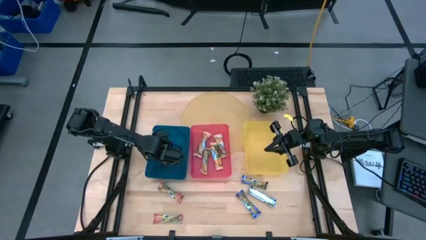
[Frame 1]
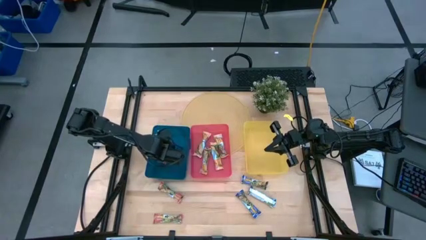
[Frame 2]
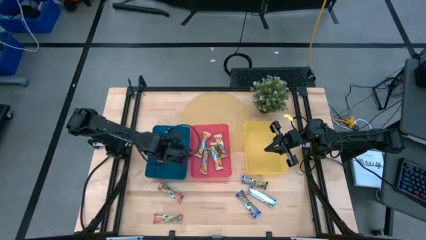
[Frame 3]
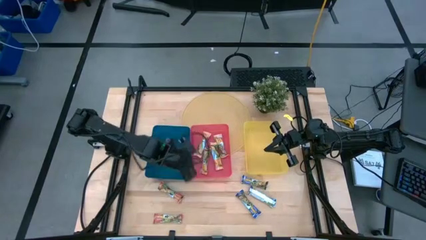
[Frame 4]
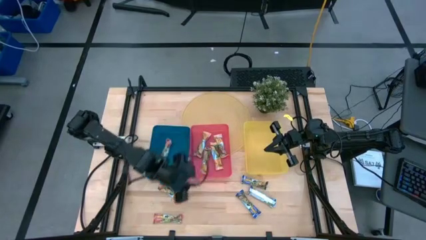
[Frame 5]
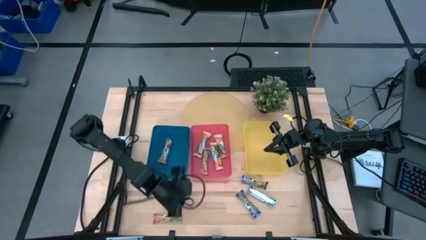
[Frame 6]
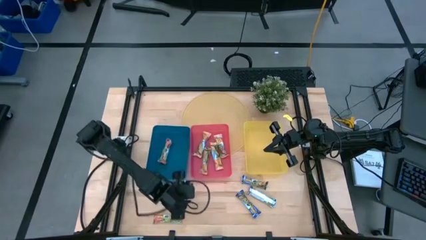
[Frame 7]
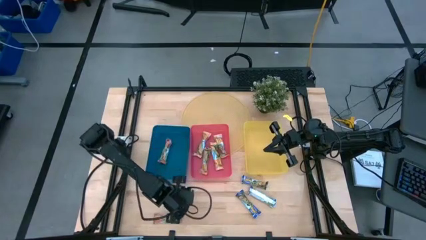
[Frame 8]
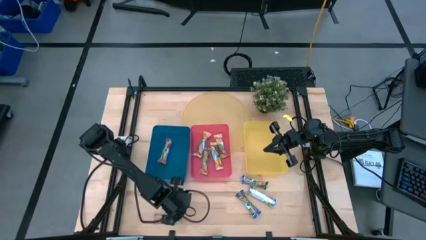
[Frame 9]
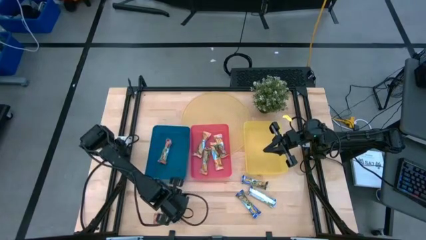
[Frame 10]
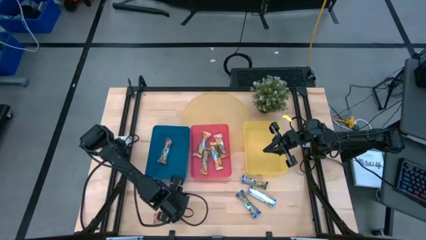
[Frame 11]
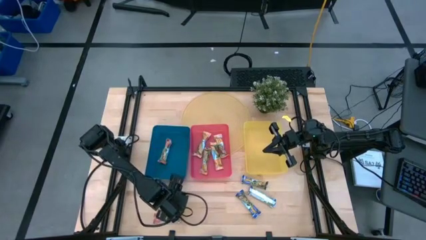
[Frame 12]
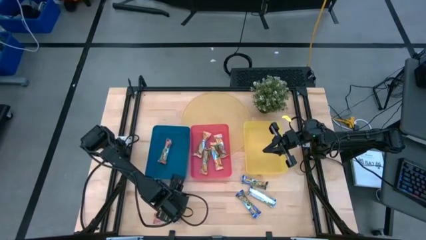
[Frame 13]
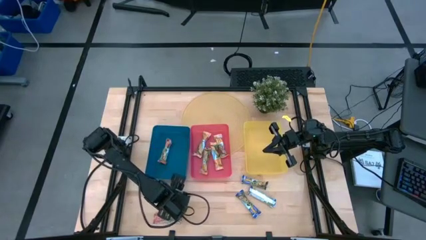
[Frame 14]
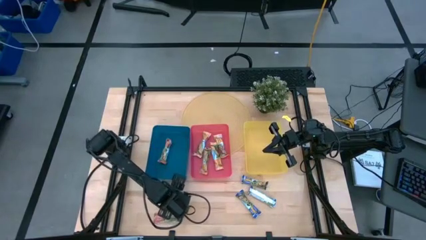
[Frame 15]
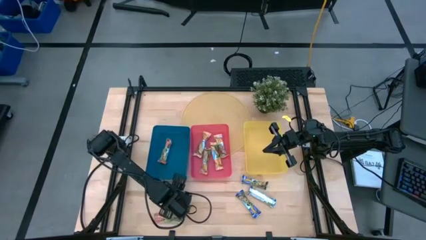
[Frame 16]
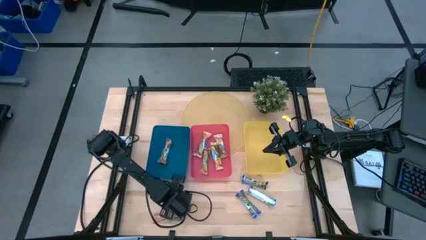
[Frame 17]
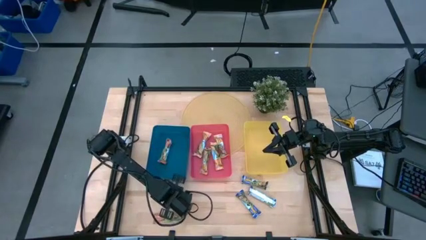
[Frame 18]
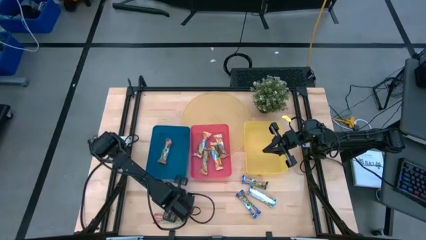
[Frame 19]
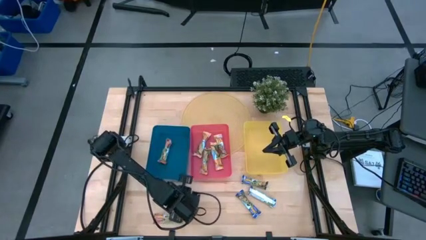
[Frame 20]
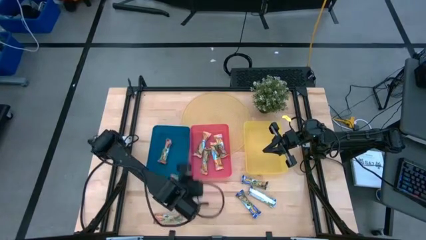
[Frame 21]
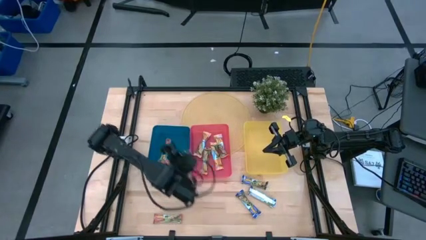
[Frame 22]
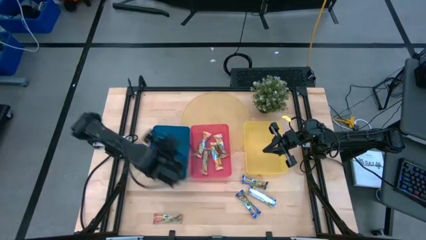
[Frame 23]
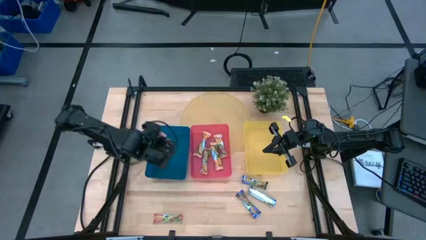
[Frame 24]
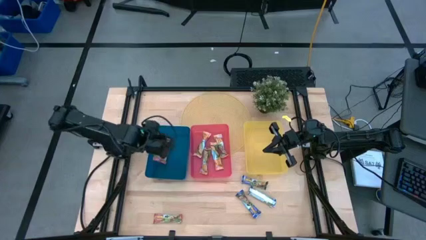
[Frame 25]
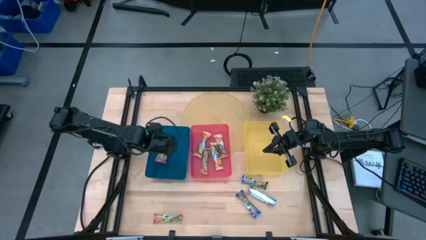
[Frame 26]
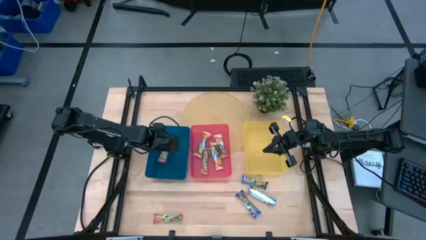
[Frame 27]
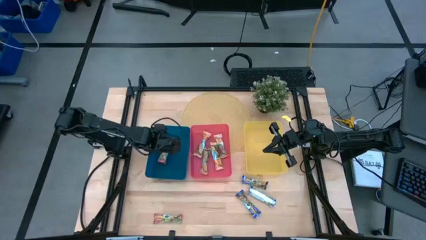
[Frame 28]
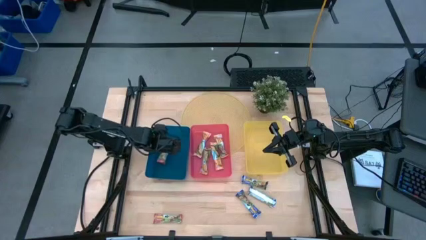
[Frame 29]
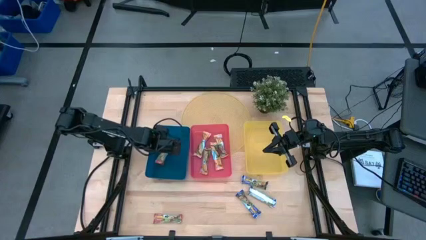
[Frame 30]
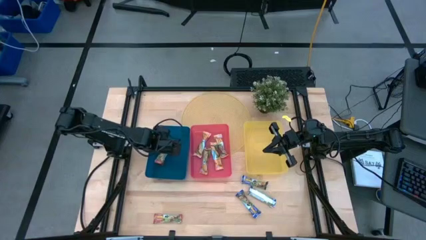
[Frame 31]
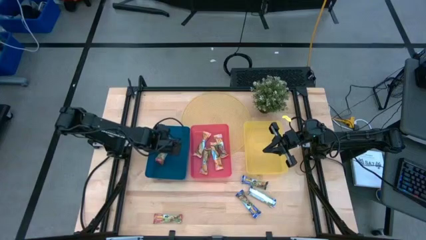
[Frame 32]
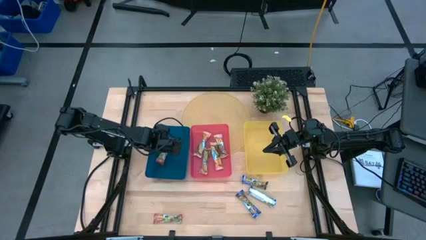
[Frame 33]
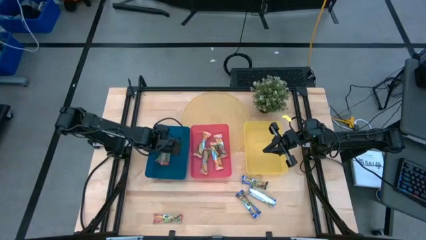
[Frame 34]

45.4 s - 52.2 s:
Task: Pick and place Granola Bars by type
Put the red granola bar into the blue bin

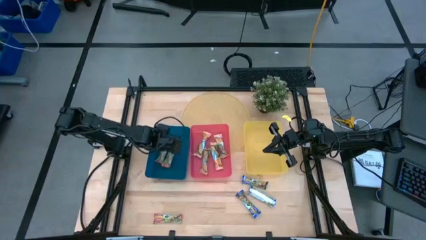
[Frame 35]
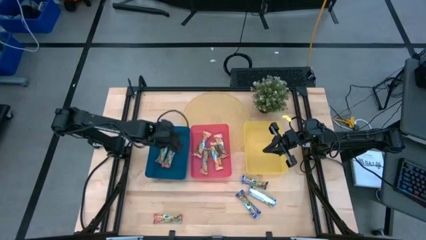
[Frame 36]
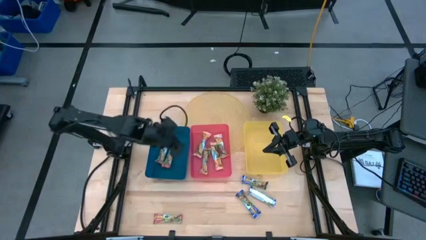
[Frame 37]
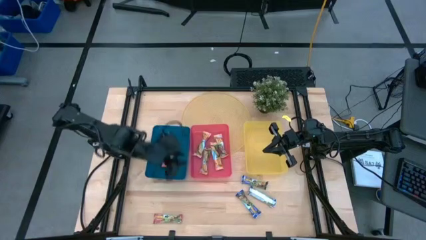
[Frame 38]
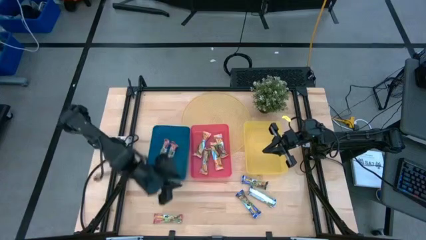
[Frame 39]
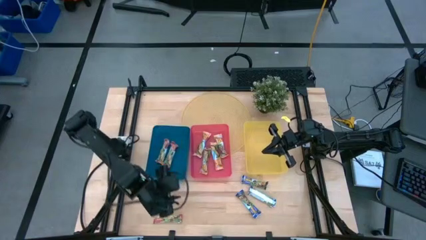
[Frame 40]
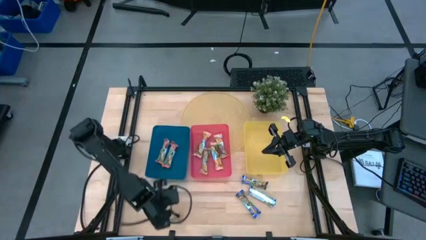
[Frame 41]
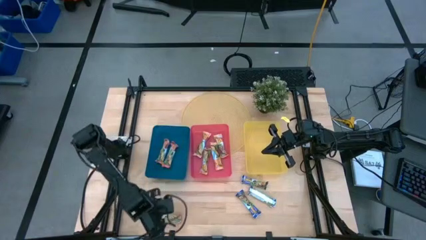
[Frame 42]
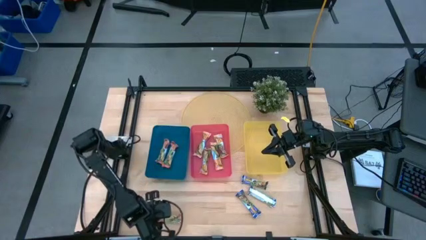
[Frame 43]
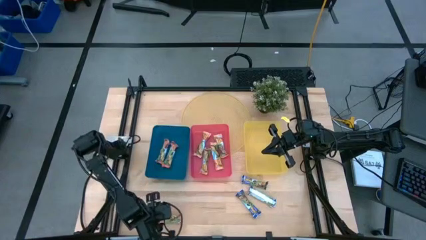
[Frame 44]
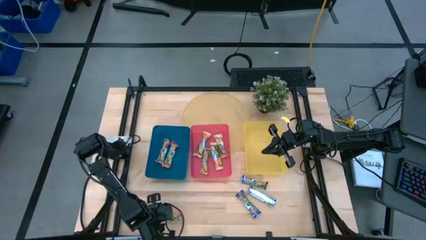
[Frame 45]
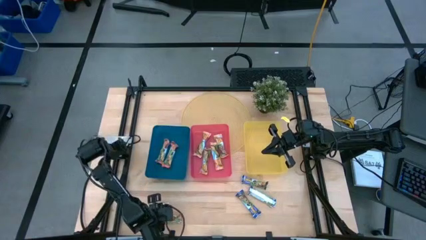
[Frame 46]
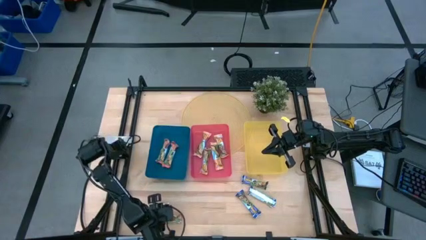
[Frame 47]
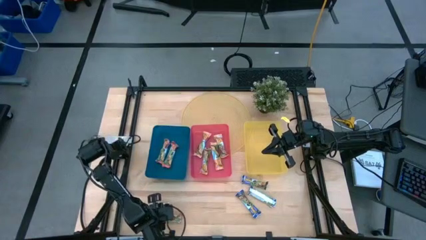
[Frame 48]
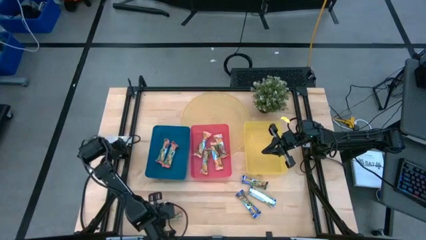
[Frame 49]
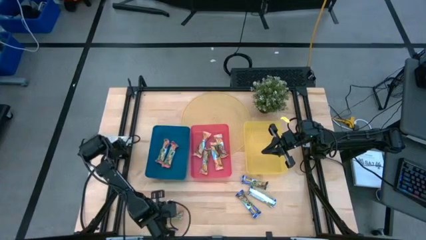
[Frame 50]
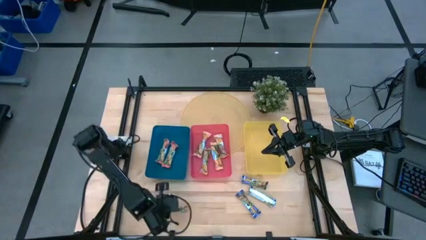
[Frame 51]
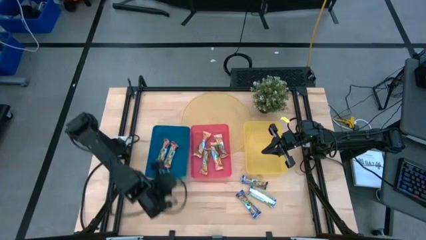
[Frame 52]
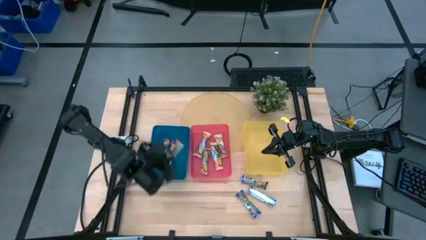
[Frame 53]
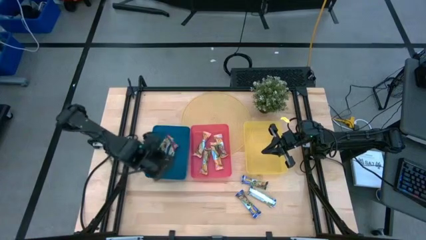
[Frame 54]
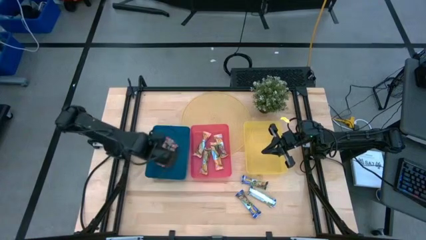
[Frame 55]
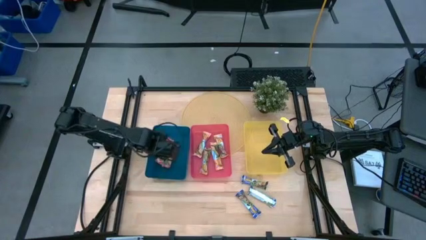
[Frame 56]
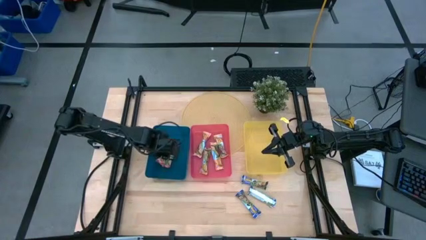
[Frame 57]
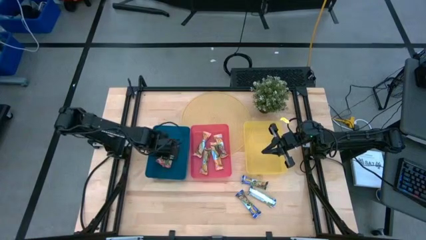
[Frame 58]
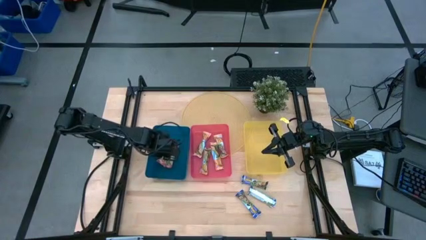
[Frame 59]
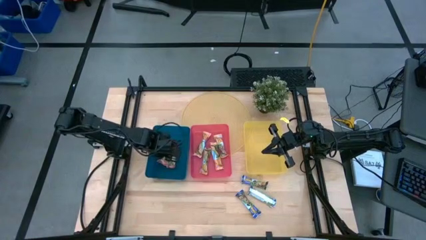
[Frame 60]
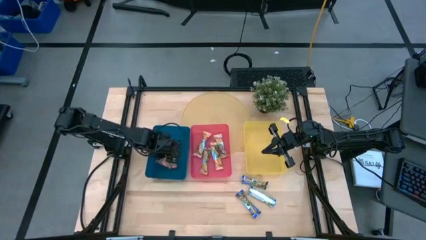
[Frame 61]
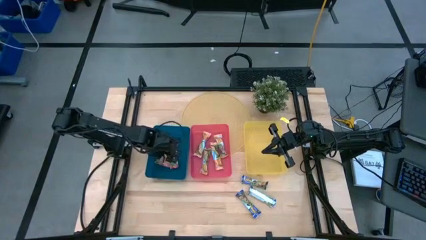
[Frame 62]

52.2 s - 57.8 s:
Put the red granola bar into the blue bin

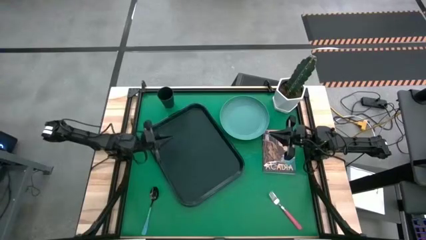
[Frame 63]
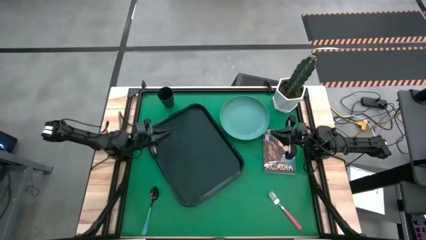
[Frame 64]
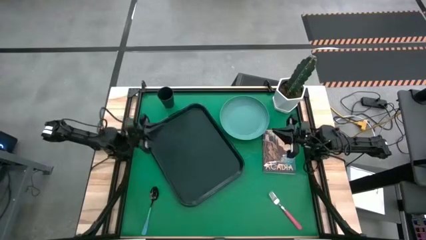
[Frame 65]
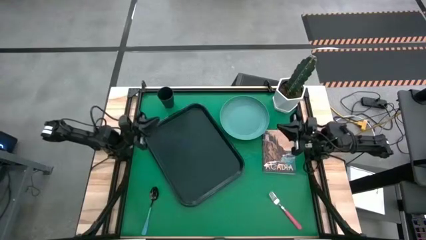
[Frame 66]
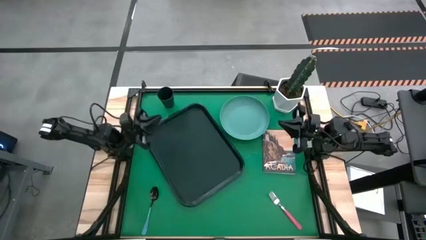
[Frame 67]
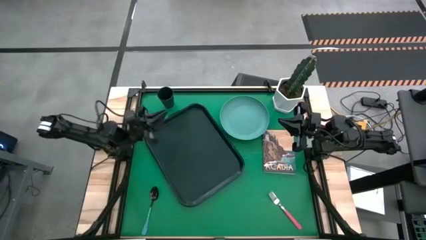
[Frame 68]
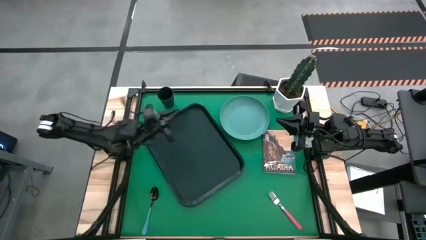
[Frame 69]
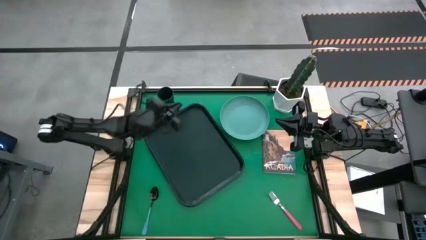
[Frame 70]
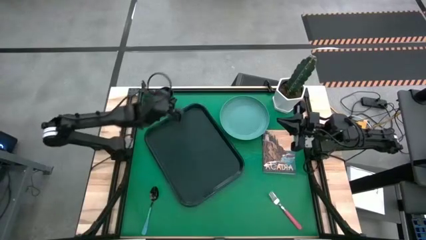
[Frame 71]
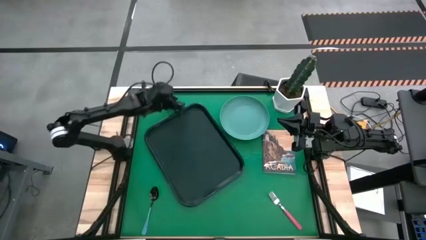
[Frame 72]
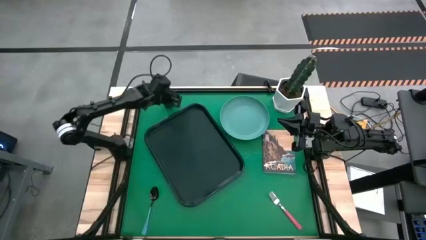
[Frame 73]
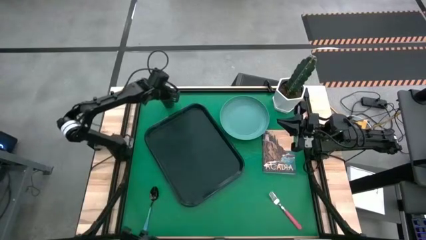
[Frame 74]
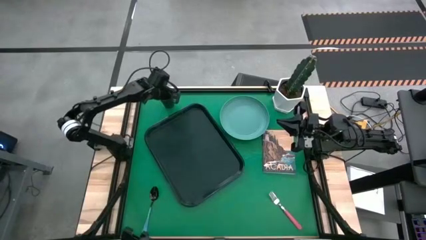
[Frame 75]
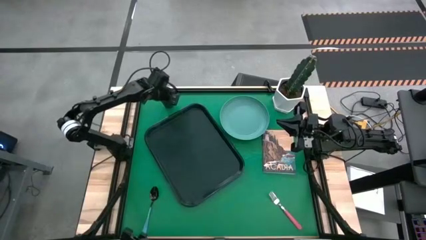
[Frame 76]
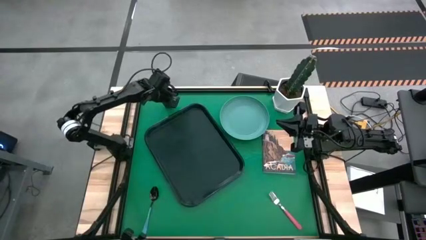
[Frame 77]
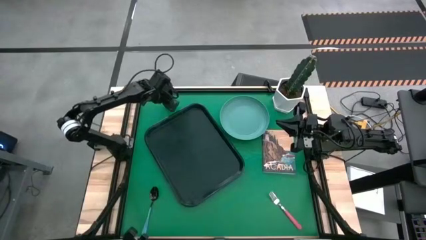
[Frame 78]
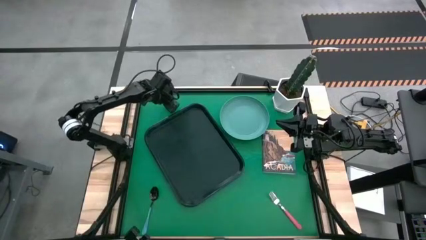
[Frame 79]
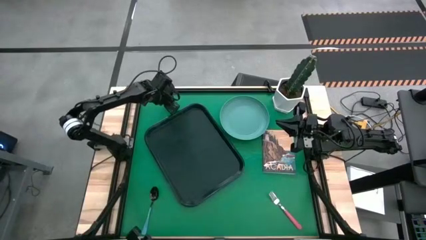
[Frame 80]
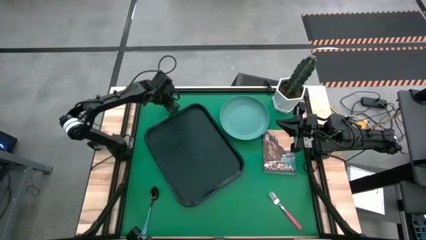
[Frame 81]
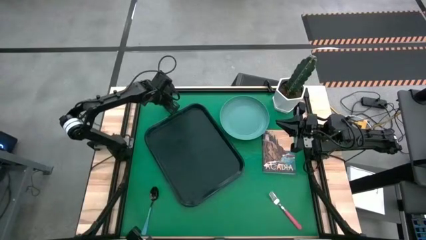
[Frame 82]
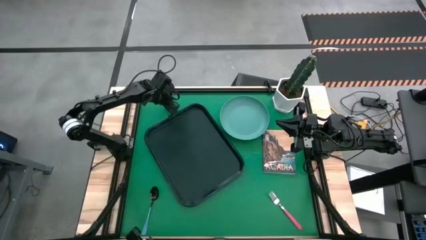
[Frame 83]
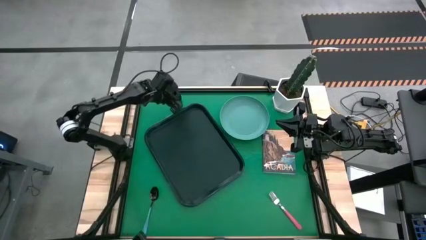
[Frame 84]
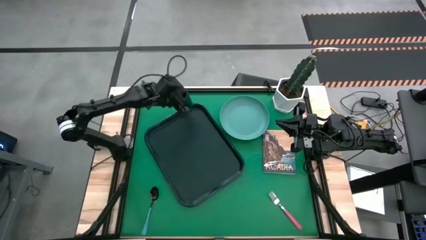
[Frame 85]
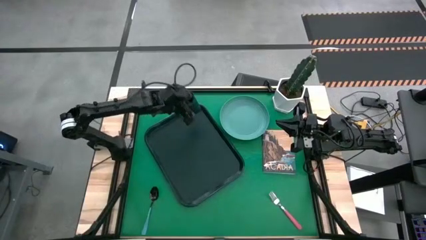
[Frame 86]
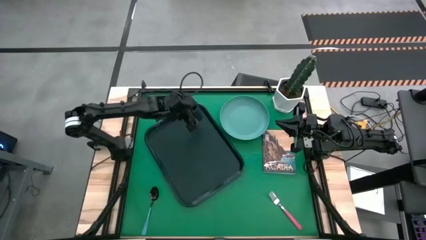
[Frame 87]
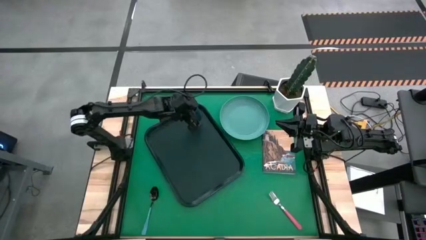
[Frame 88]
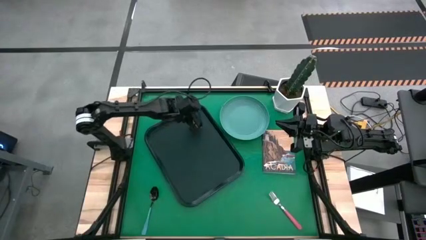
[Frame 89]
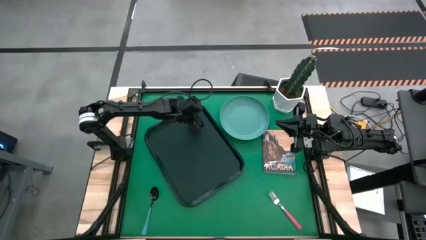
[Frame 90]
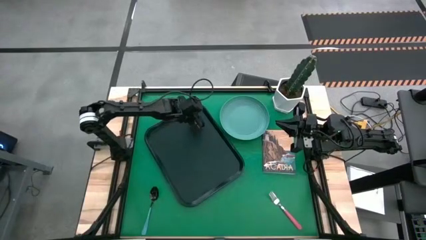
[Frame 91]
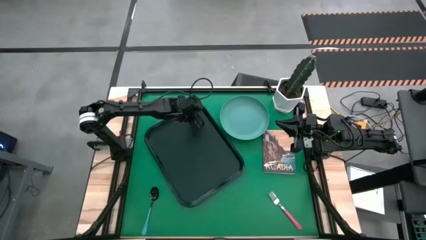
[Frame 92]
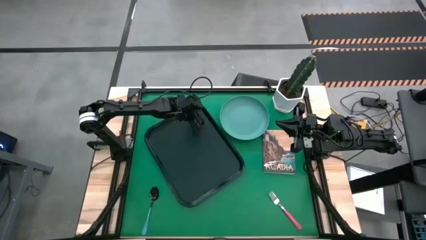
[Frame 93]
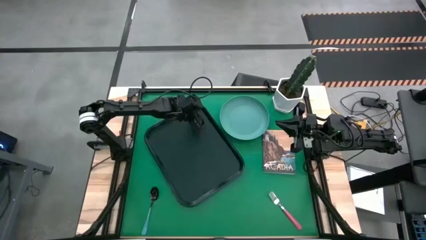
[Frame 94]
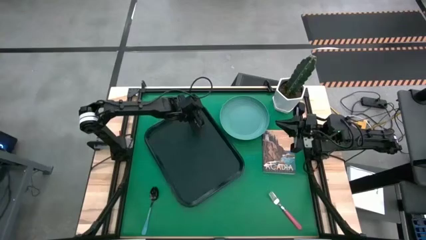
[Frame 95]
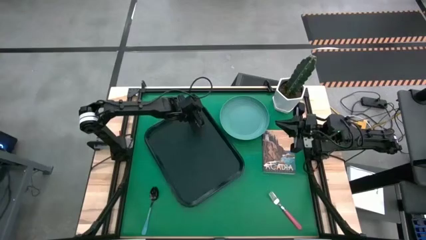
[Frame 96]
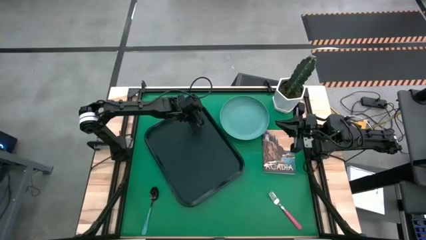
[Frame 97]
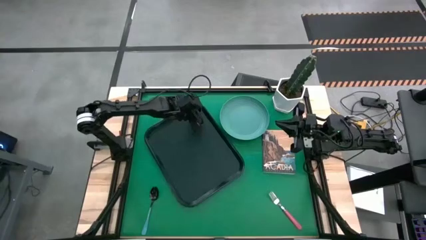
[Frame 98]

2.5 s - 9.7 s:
Task: Pick and place plate/cup/fork/spoon on tray
Put the black cup on the black serving tray
